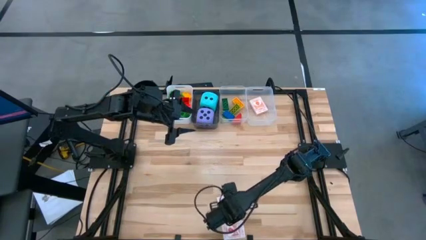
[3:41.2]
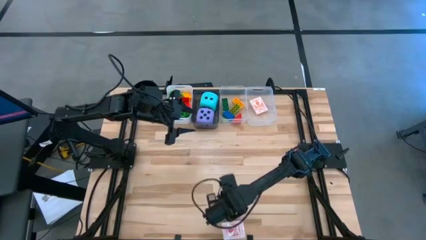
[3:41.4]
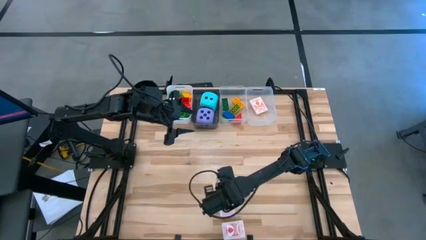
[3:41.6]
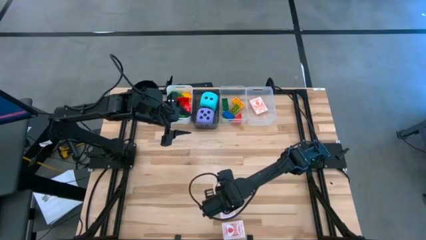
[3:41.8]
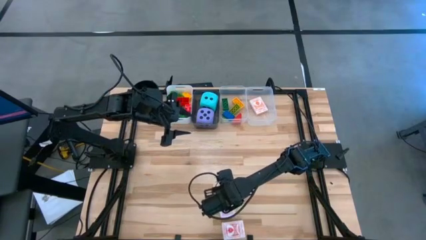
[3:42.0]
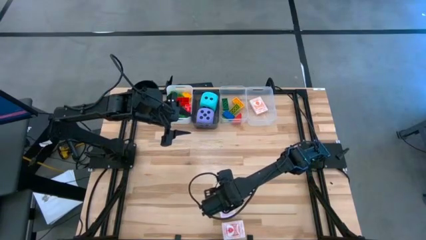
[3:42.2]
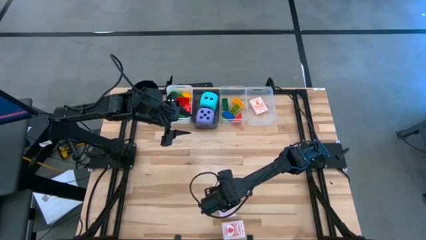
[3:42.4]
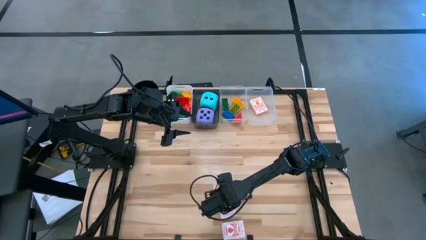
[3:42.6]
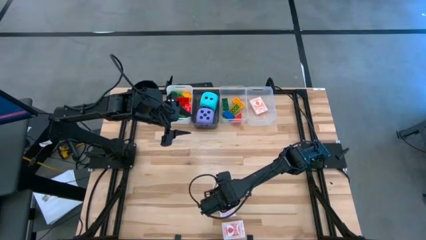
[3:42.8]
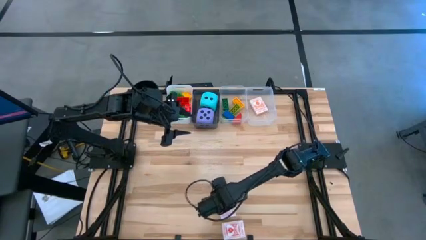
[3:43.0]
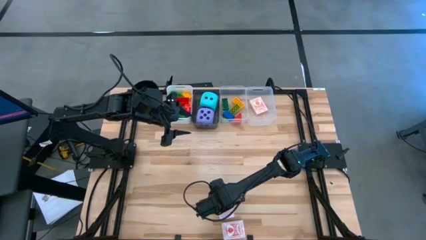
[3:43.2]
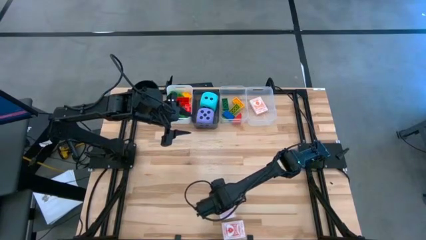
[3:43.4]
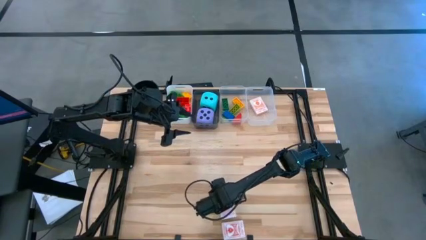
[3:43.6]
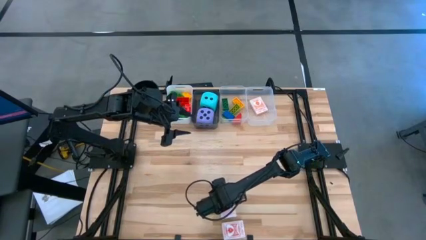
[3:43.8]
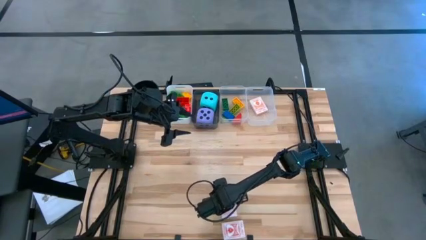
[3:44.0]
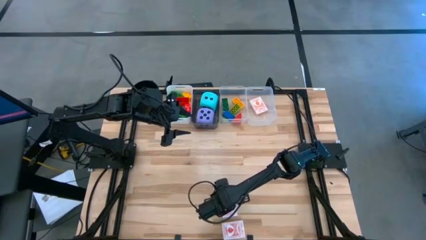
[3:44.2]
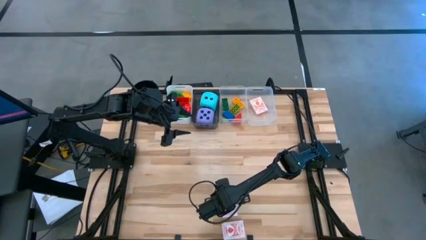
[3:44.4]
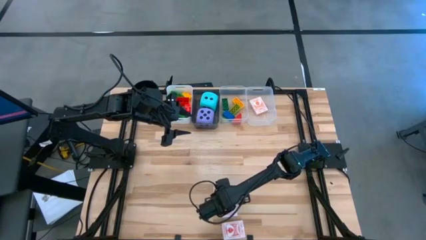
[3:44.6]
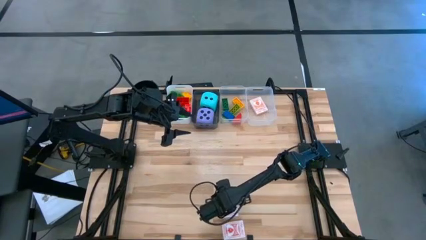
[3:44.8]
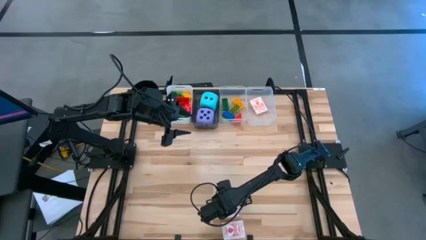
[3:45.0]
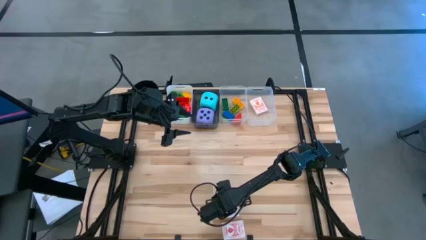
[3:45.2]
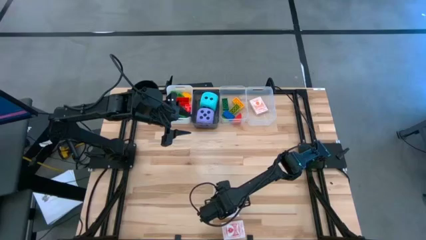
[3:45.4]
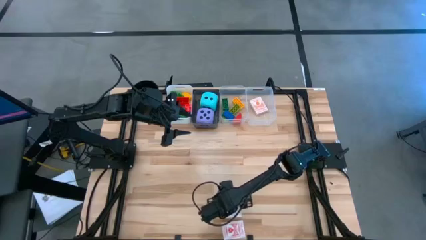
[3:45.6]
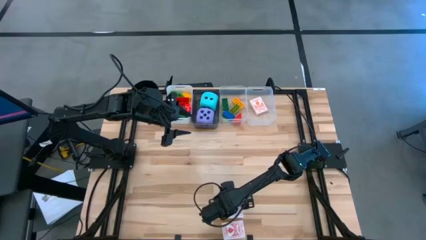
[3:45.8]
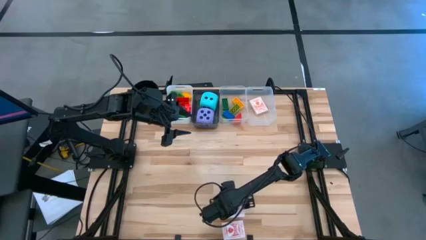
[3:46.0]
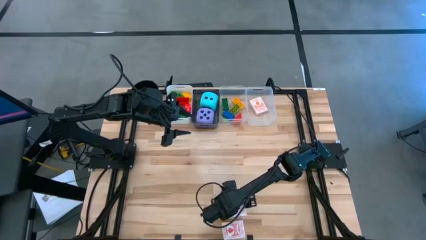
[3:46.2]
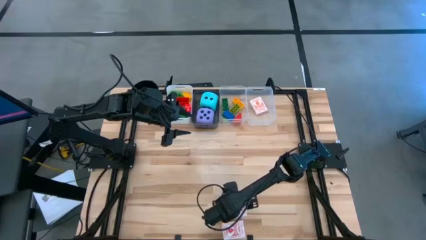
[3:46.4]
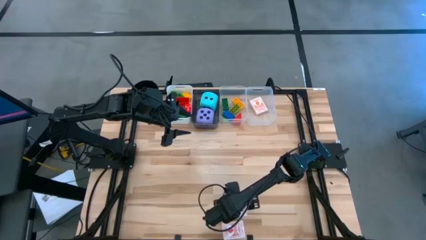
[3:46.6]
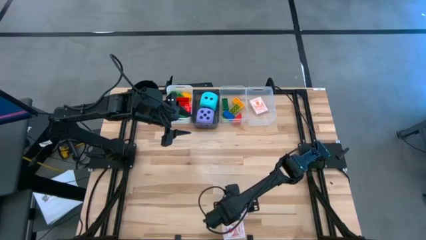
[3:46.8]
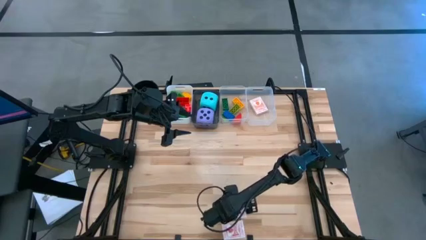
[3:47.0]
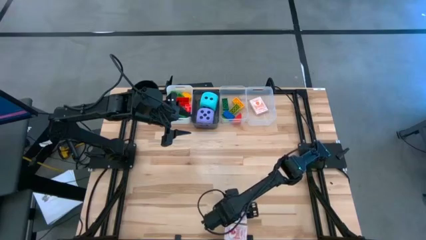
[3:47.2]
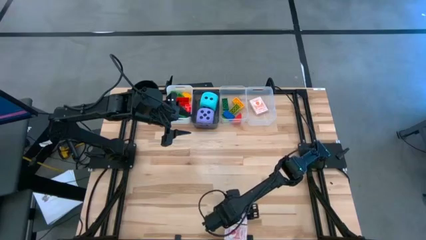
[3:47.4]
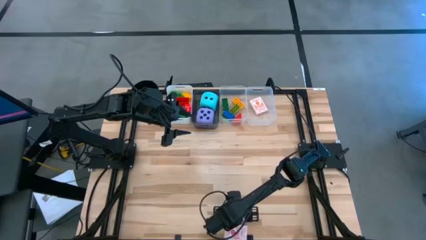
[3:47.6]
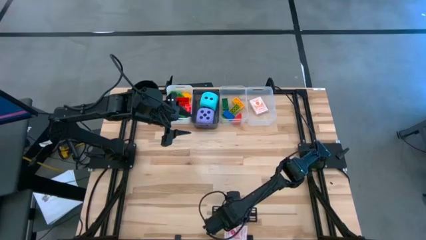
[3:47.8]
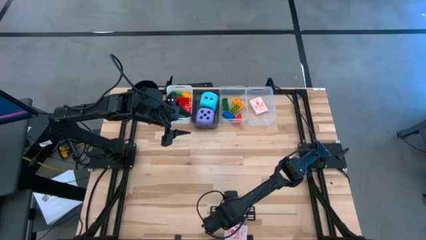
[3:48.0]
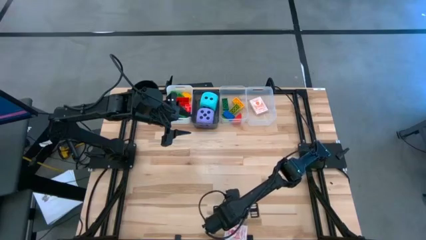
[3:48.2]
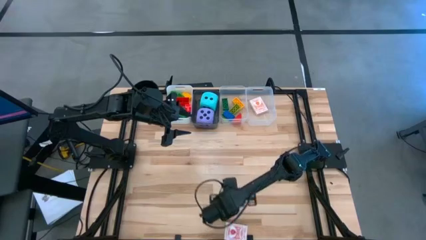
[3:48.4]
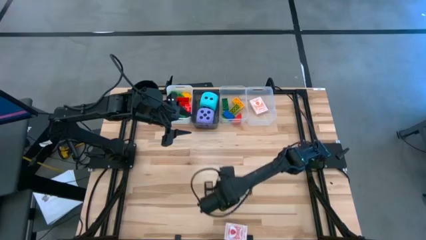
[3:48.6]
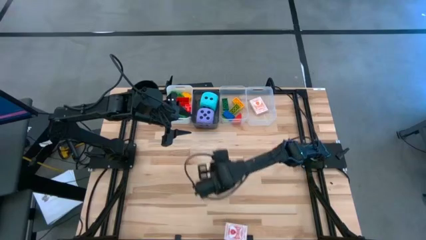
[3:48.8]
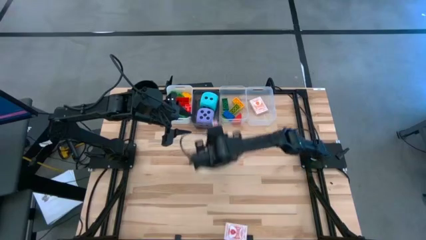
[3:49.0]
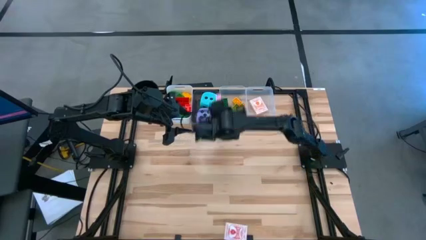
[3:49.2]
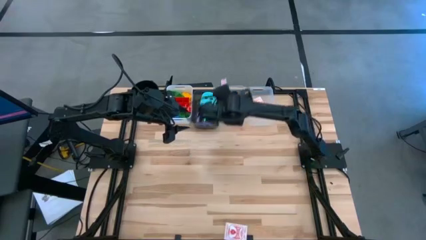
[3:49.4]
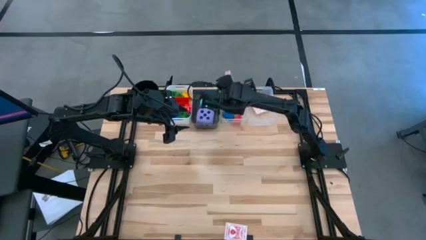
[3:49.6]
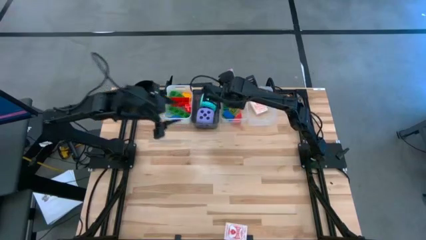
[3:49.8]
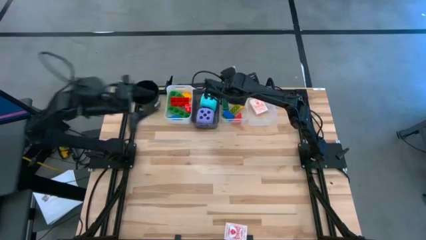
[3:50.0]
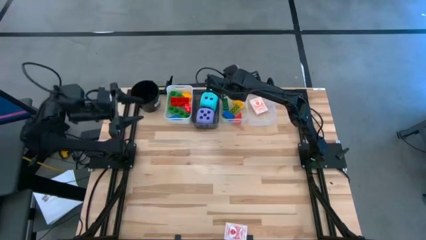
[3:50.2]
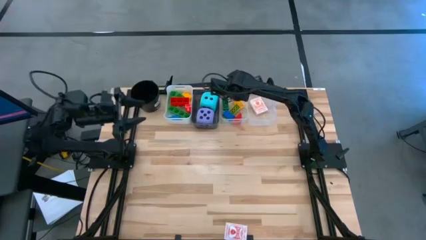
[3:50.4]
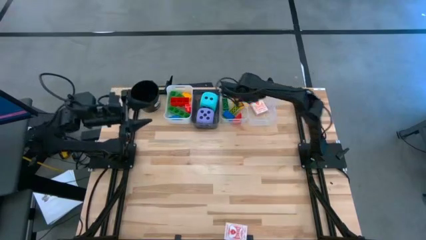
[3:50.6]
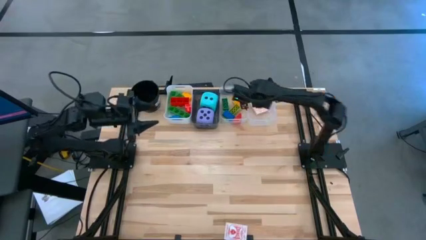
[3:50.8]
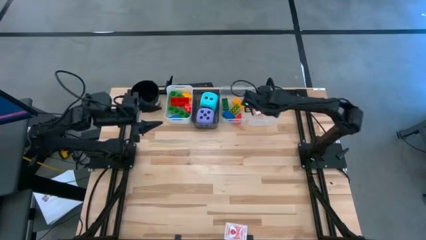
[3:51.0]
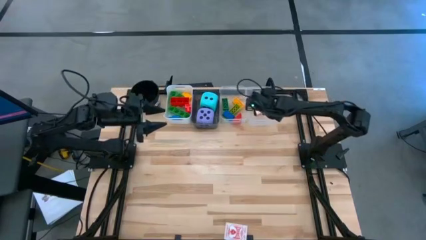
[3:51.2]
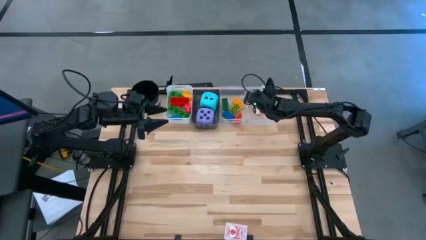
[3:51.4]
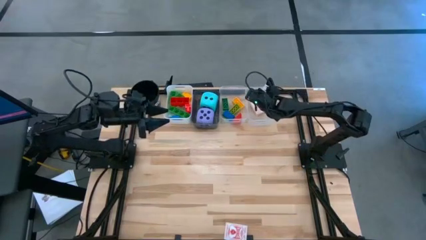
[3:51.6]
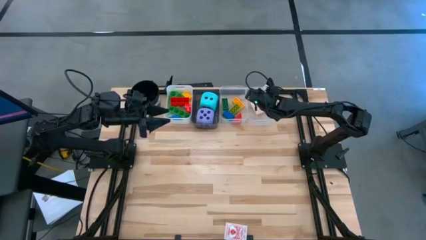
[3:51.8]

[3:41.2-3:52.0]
Task: Pick & Place Toys
Put the pink deck of cards into the right transparent bin
